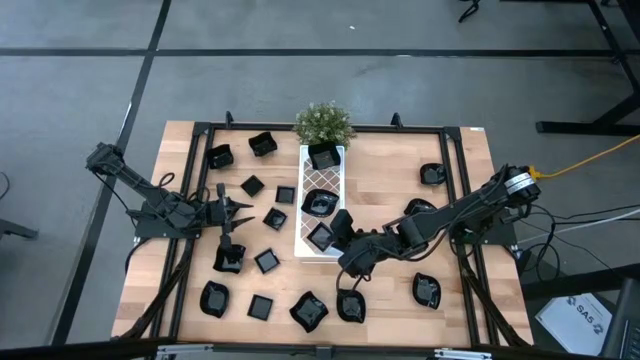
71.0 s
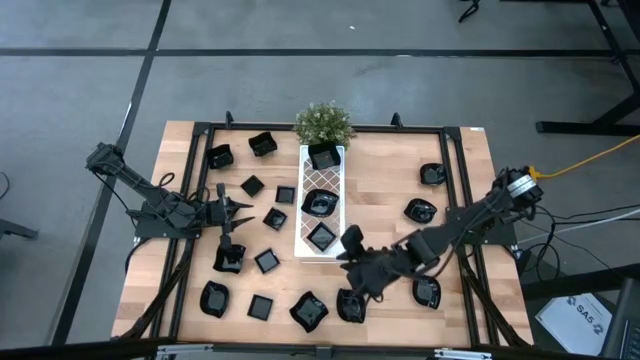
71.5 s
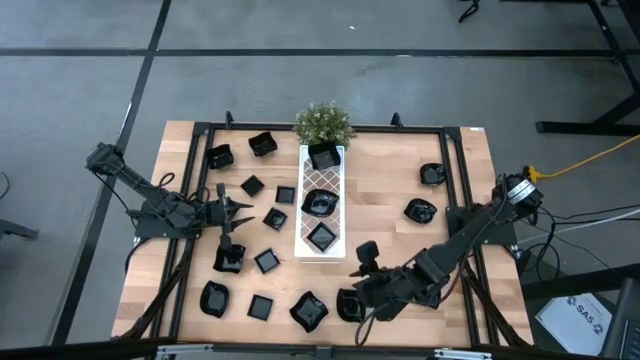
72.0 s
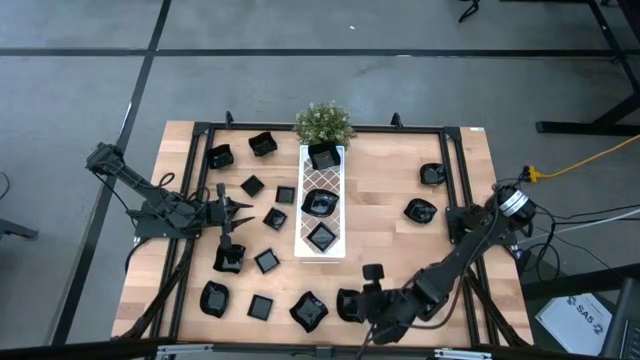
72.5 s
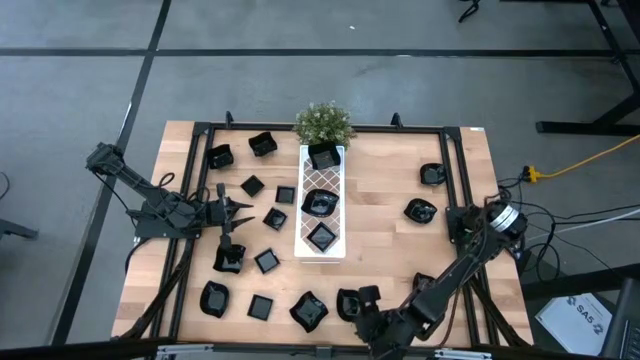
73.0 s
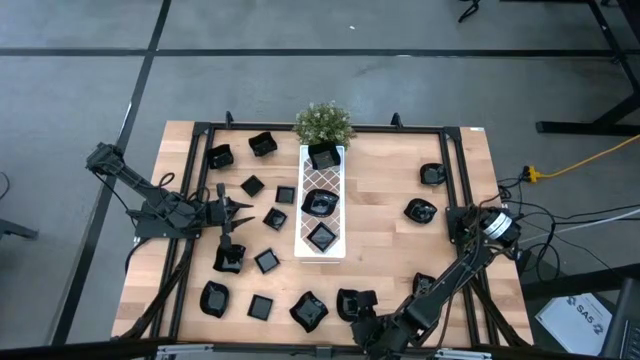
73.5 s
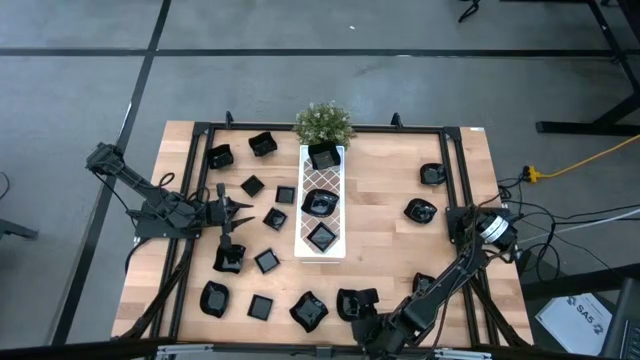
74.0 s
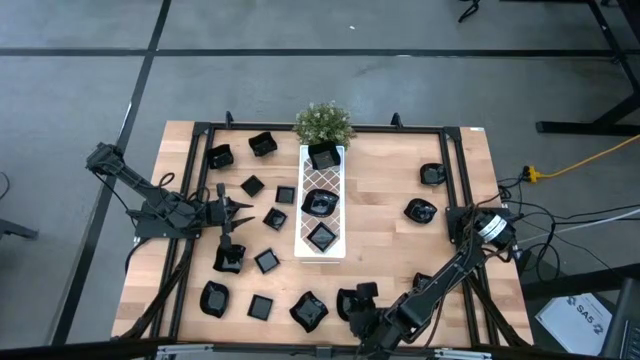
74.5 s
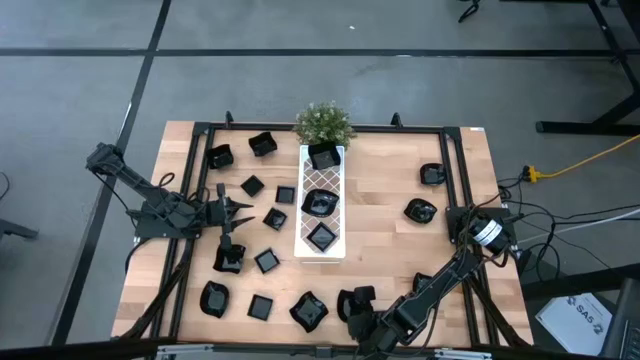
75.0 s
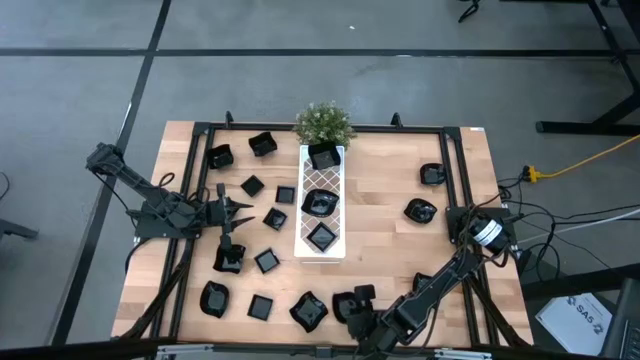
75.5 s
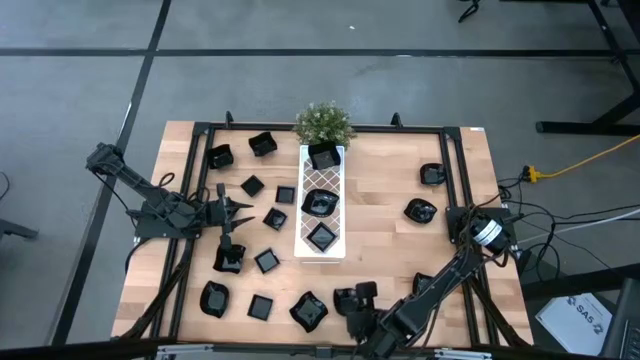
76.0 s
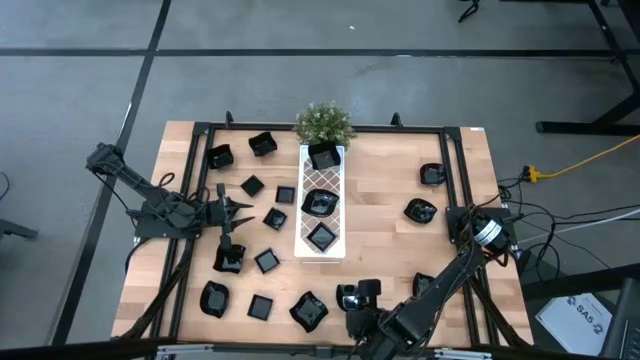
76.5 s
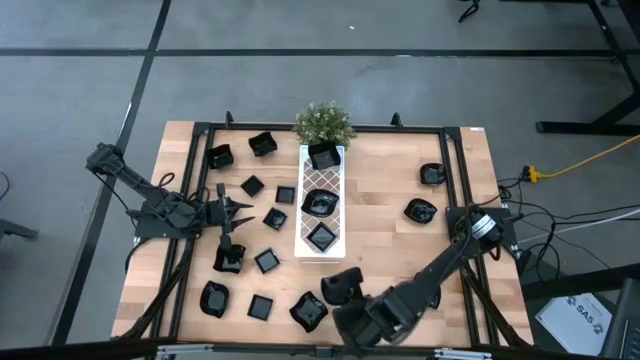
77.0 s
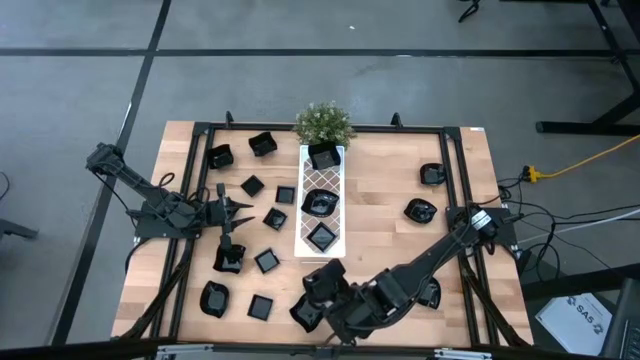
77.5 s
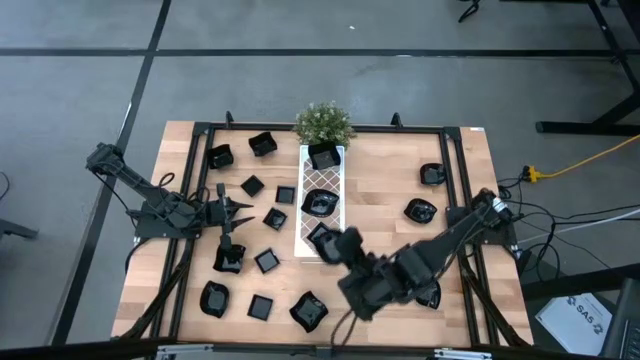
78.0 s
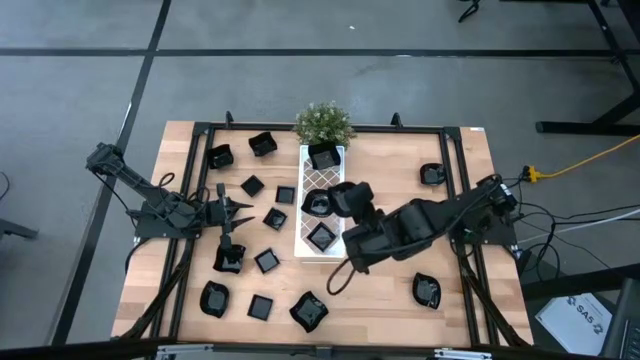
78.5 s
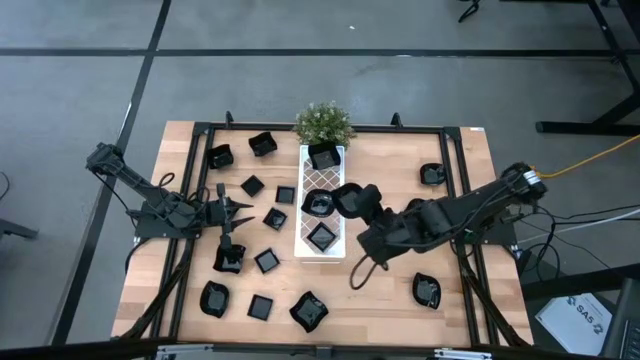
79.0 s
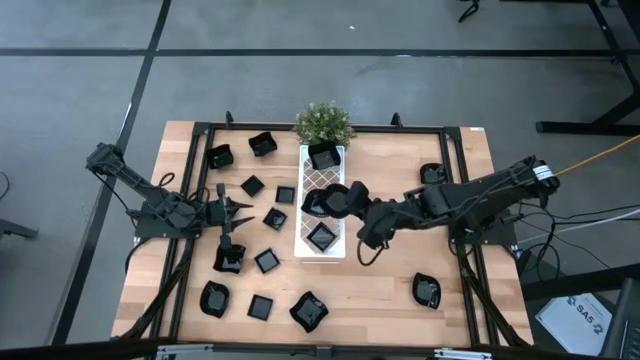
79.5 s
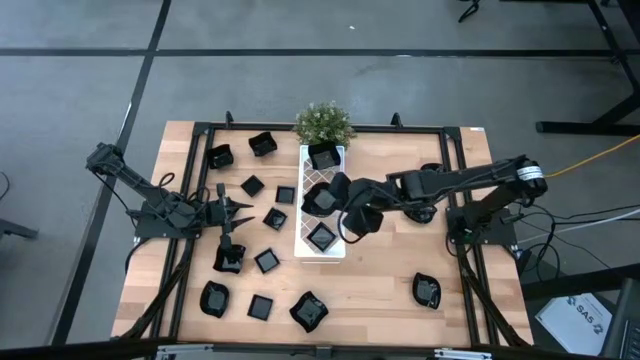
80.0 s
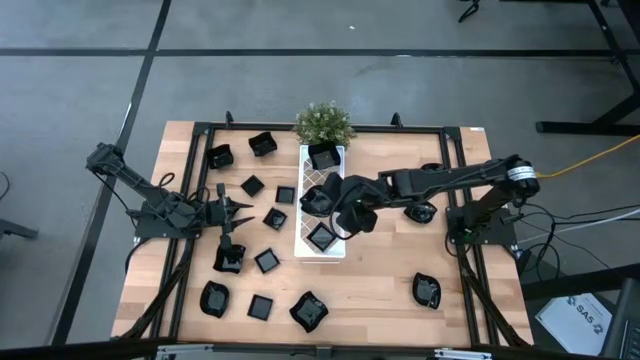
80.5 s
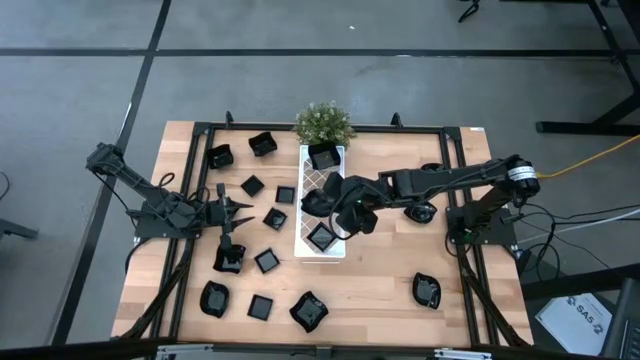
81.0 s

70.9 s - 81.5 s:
Task: Pick & Place Mini shaped plates
Stack the leaf shape plate on top of the leaf shape plate on the shelf

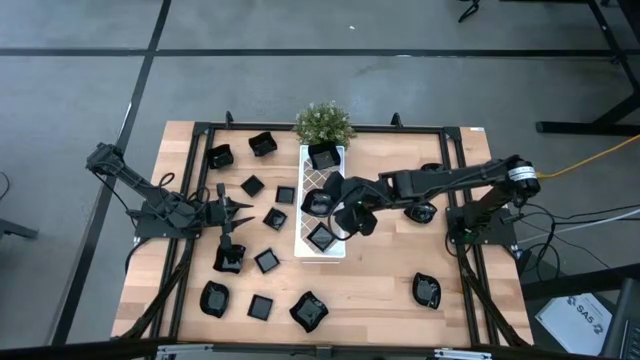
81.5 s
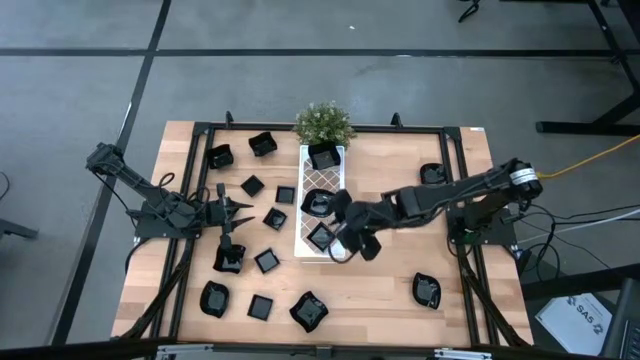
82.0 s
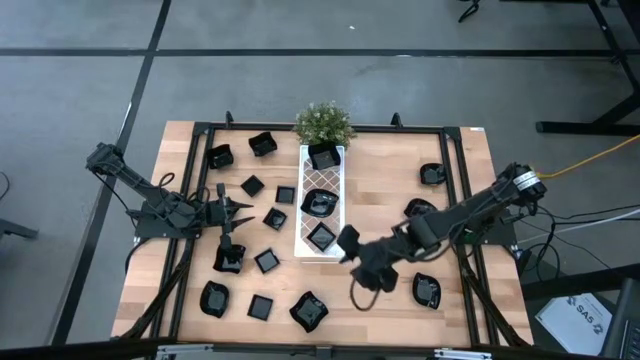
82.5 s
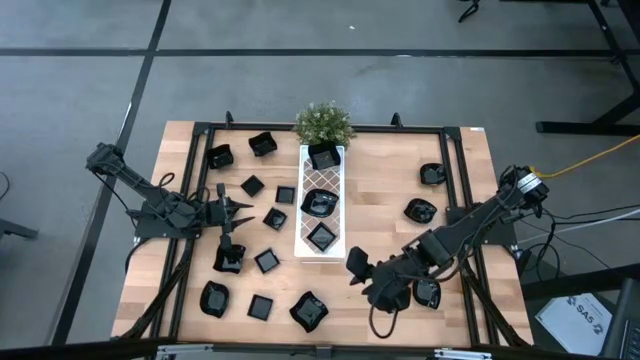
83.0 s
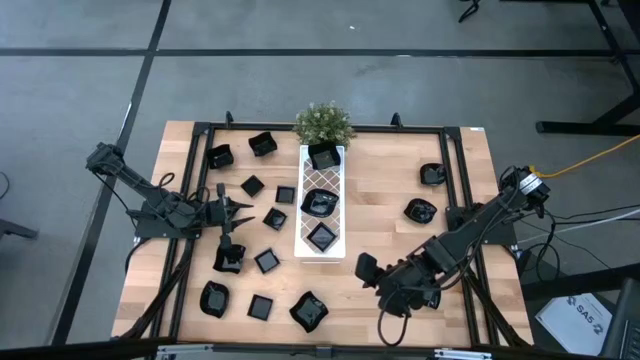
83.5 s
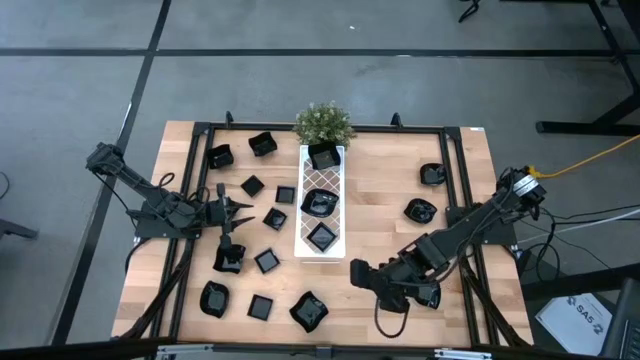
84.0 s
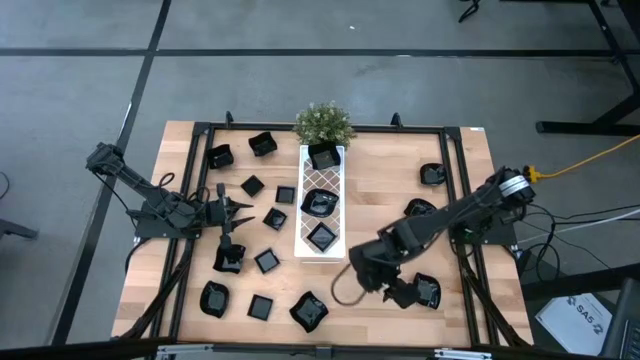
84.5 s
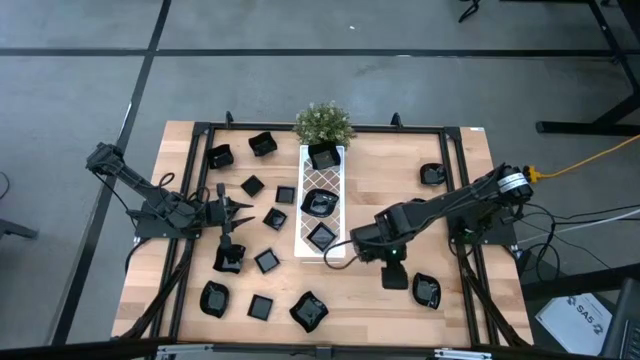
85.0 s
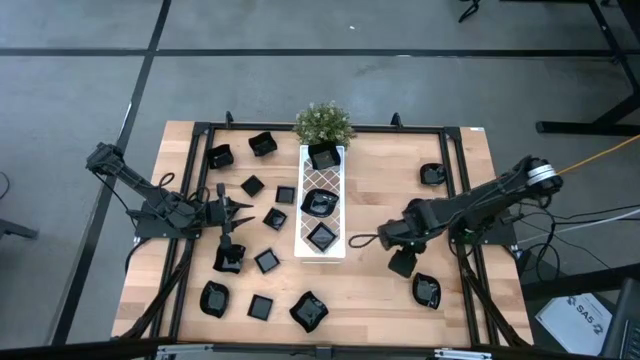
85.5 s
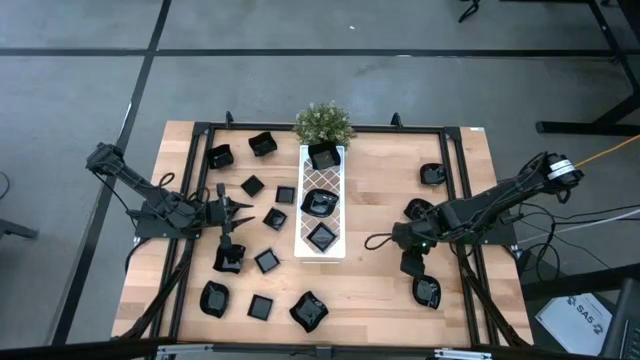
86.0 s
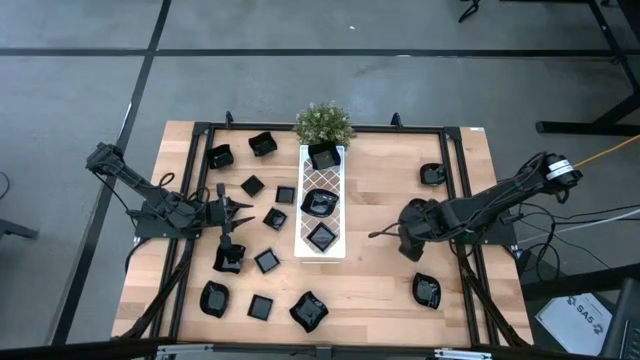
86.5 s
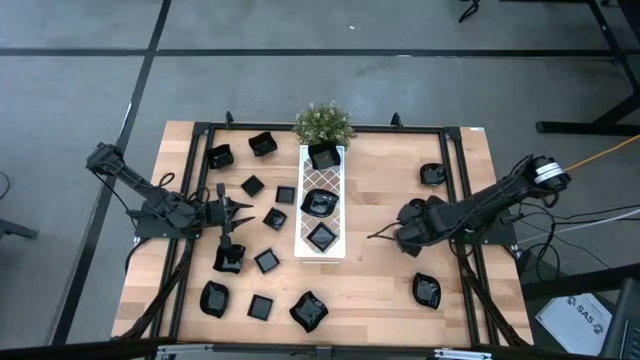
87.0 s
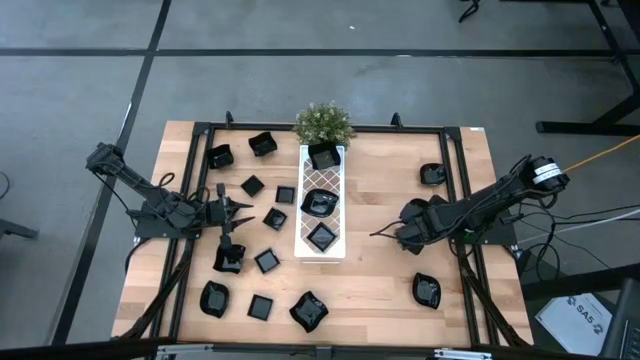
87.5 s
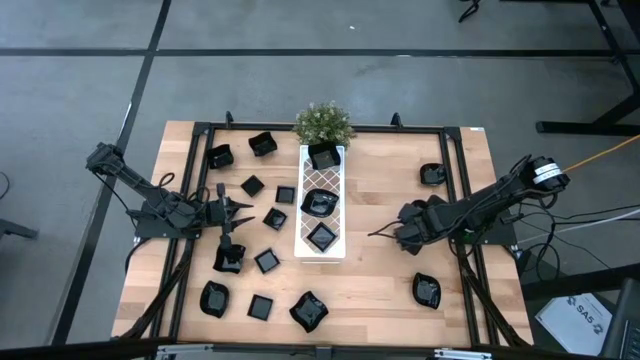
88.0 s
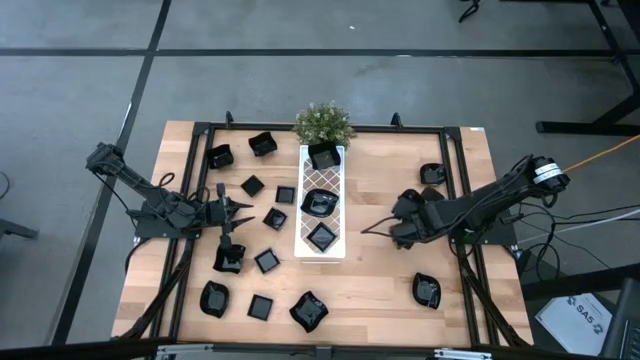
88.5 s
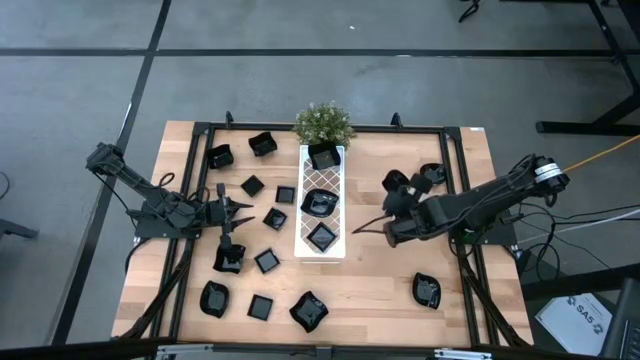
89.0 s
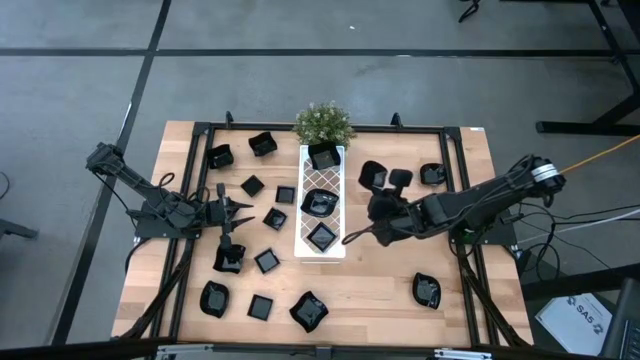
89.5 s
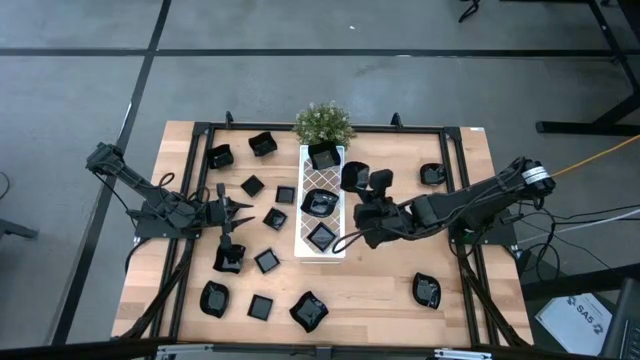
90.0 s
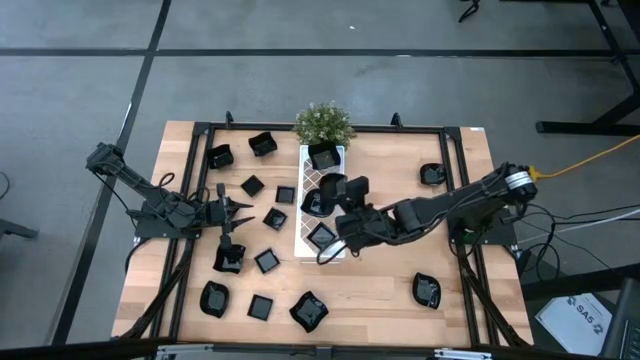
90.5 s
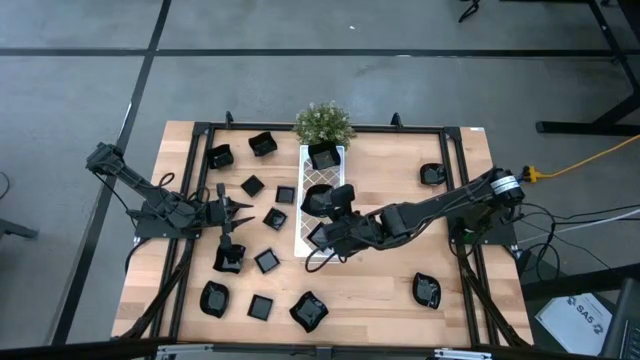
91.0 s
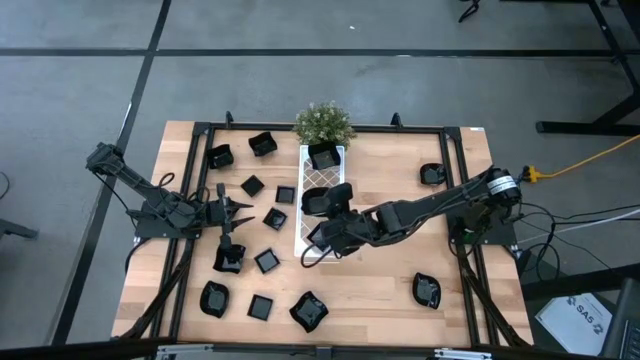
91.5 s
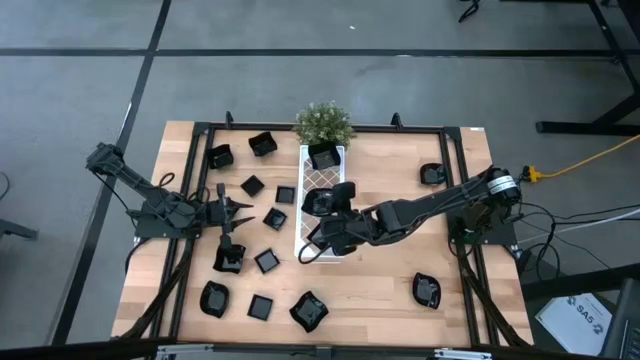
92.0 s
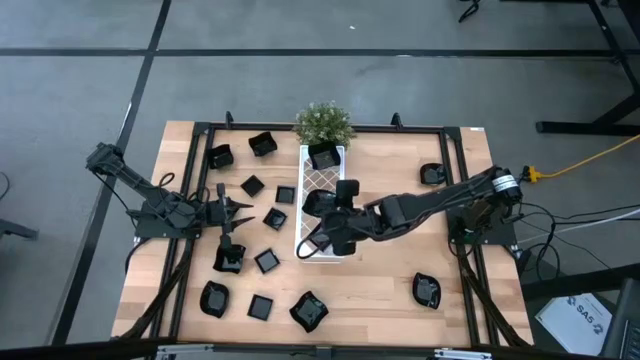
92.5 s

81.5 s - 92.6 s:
Stack the leaf shape plate on top of the leaf shape plate on the shelf
